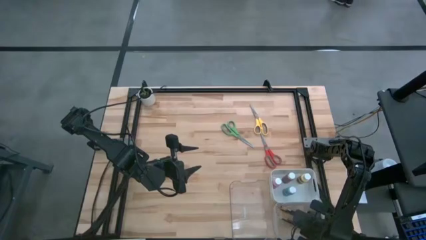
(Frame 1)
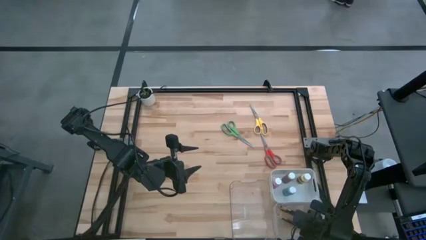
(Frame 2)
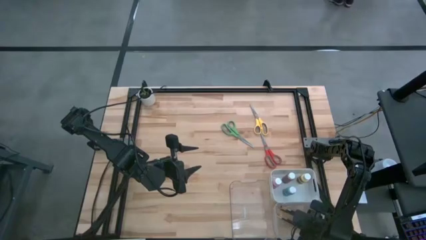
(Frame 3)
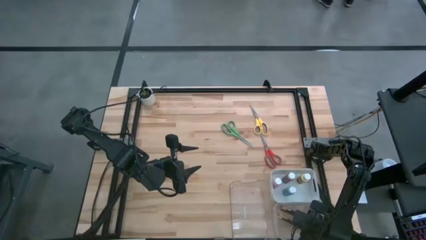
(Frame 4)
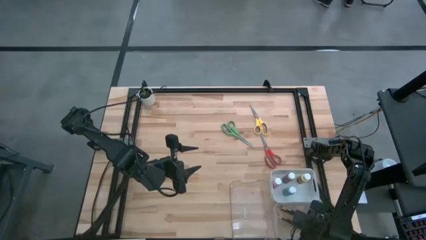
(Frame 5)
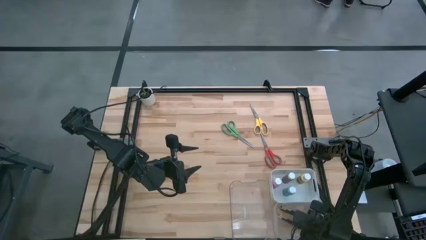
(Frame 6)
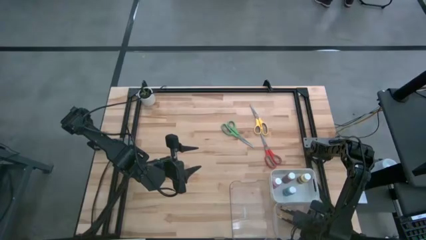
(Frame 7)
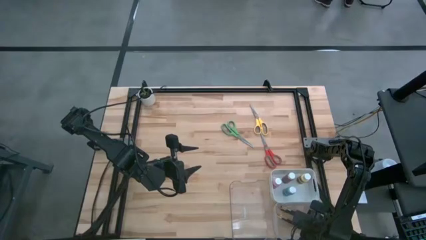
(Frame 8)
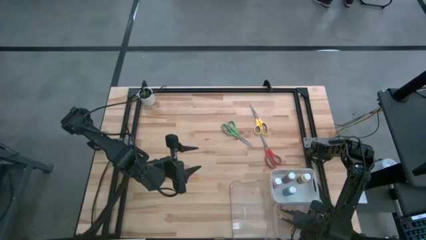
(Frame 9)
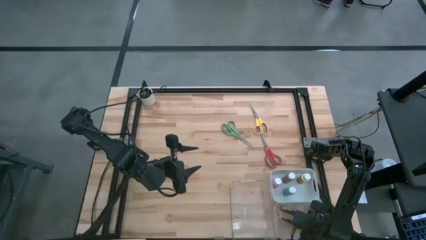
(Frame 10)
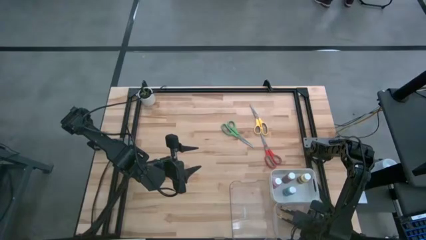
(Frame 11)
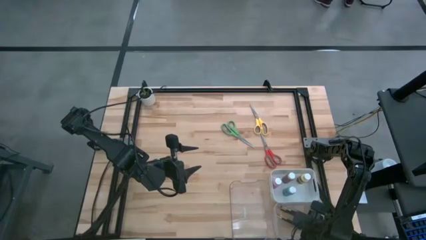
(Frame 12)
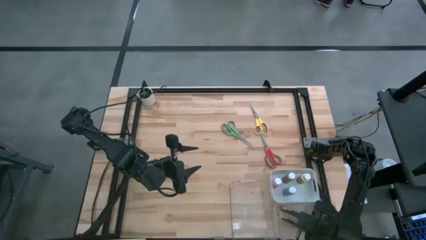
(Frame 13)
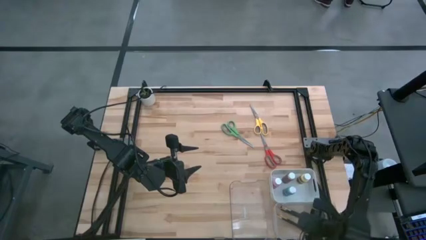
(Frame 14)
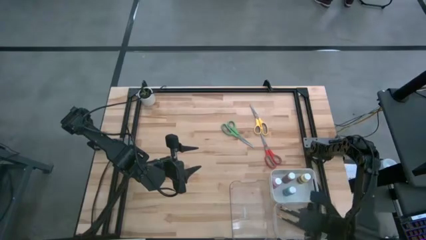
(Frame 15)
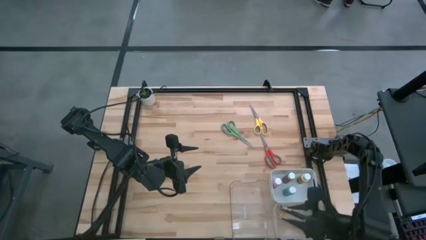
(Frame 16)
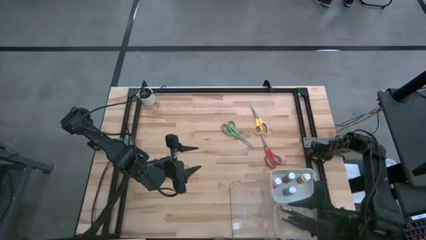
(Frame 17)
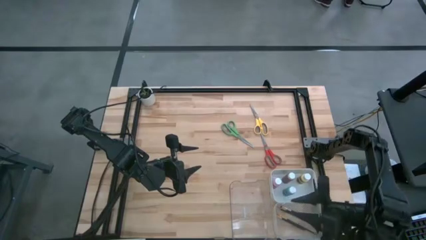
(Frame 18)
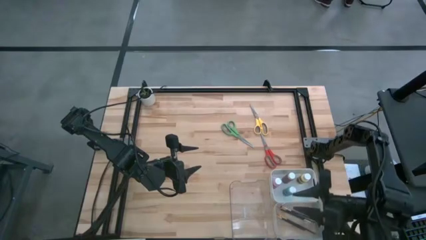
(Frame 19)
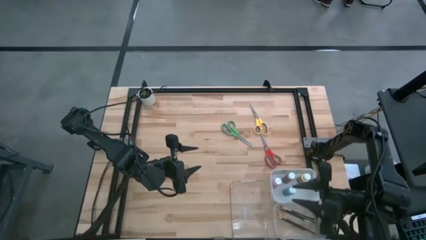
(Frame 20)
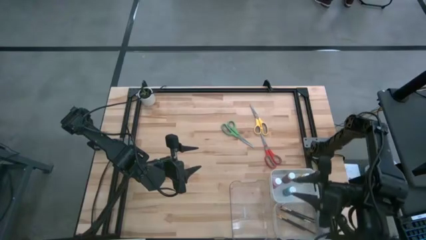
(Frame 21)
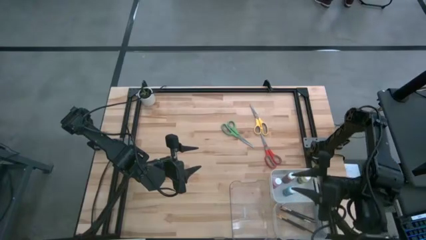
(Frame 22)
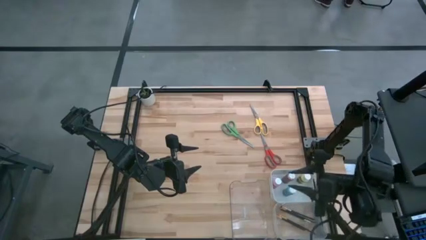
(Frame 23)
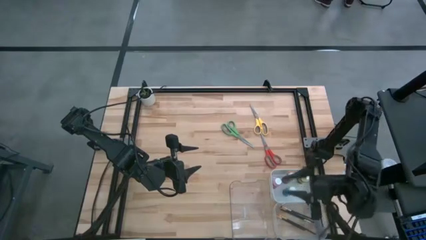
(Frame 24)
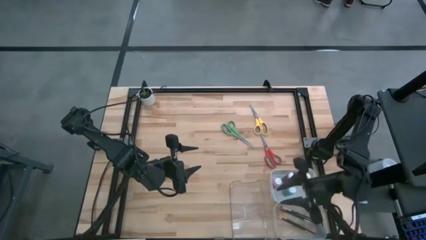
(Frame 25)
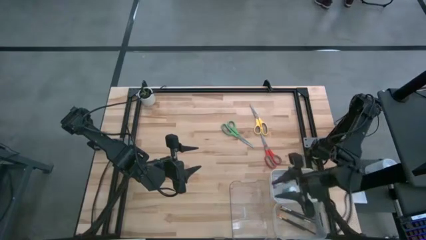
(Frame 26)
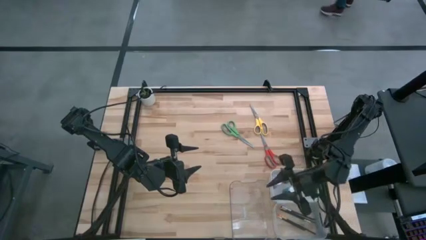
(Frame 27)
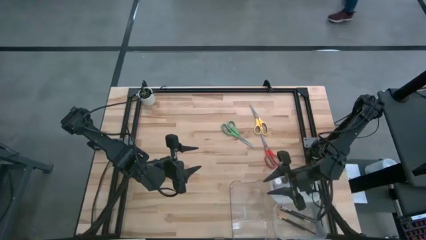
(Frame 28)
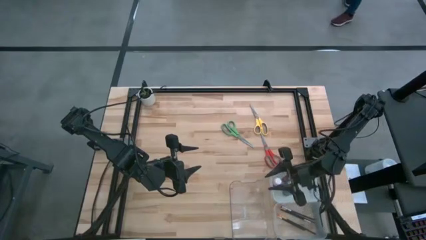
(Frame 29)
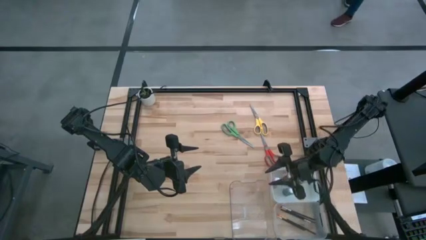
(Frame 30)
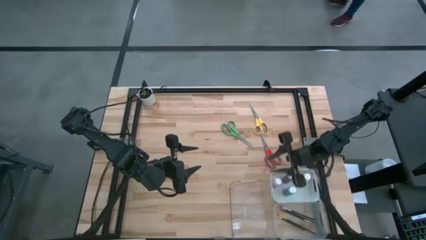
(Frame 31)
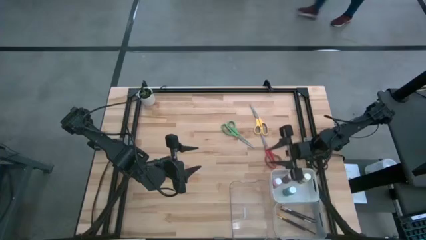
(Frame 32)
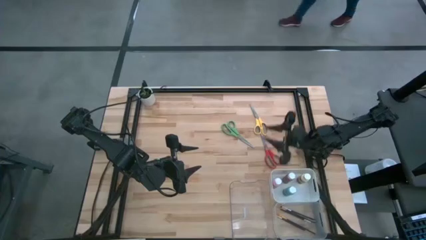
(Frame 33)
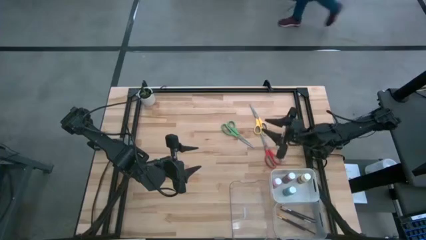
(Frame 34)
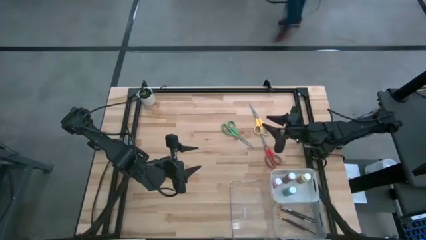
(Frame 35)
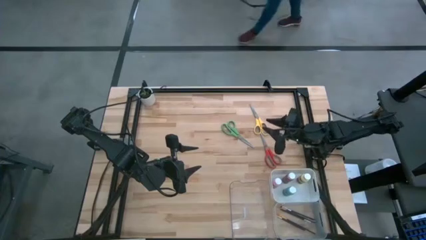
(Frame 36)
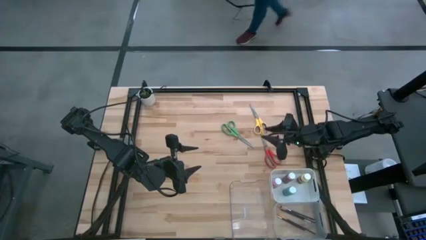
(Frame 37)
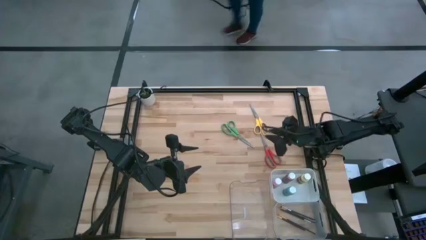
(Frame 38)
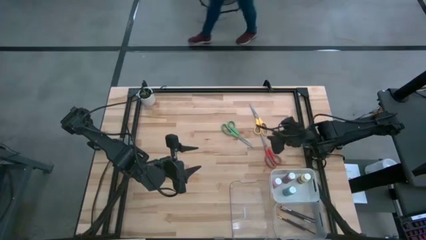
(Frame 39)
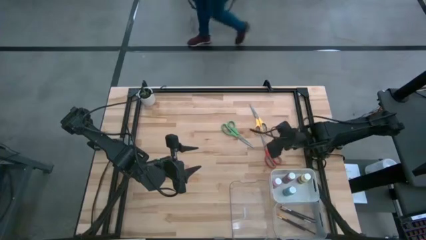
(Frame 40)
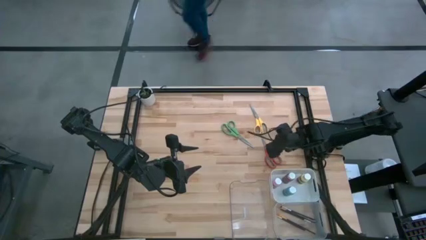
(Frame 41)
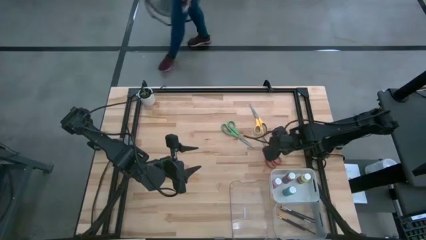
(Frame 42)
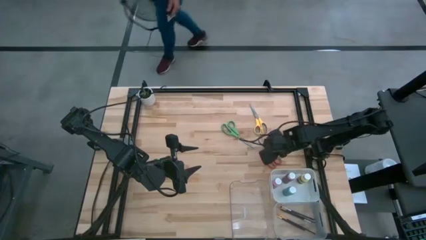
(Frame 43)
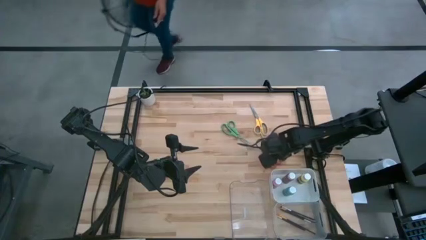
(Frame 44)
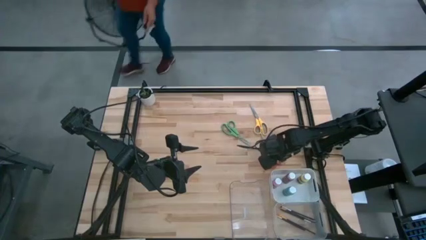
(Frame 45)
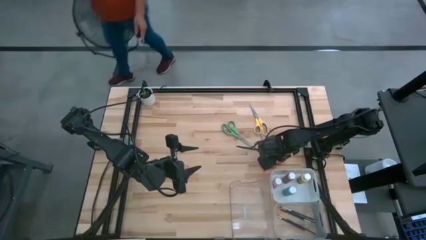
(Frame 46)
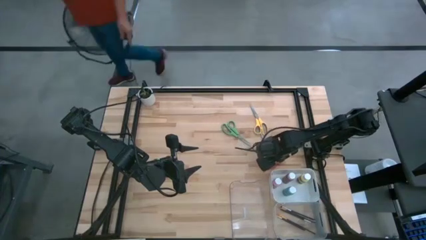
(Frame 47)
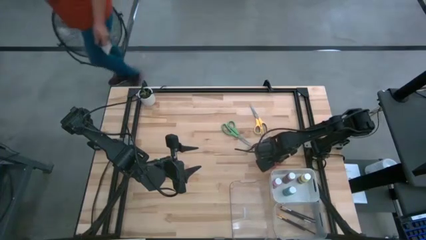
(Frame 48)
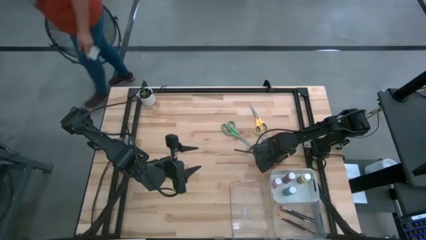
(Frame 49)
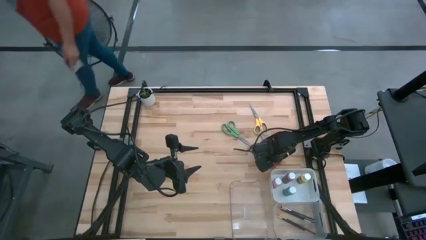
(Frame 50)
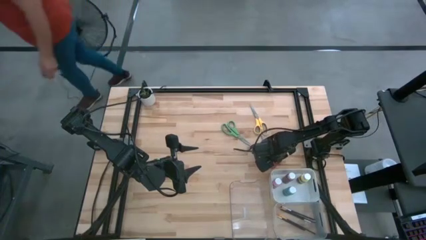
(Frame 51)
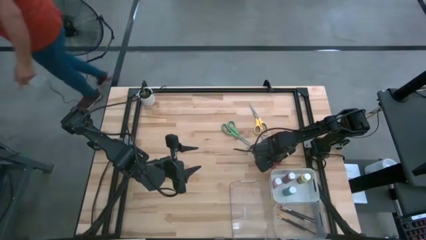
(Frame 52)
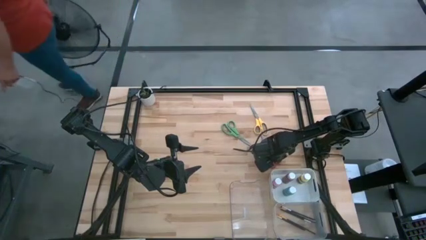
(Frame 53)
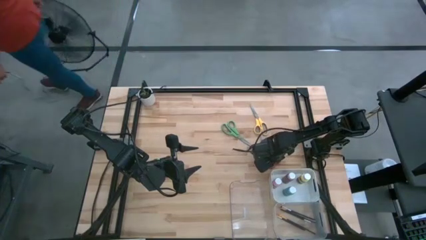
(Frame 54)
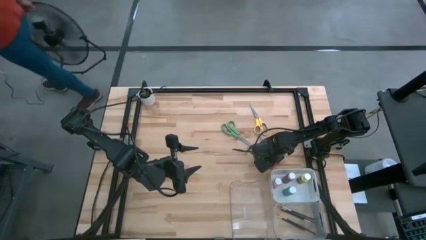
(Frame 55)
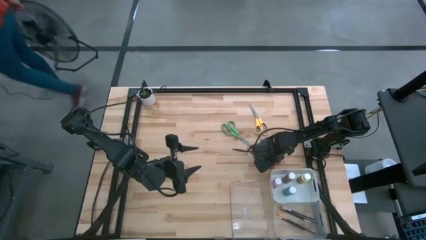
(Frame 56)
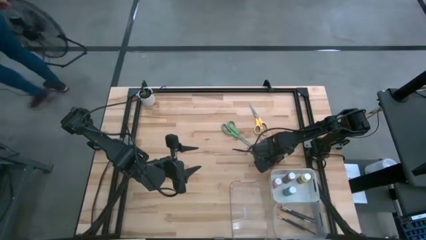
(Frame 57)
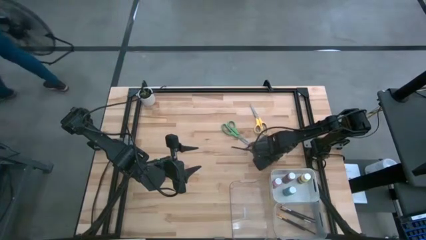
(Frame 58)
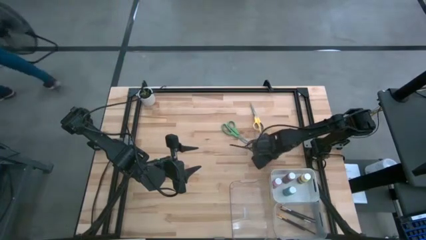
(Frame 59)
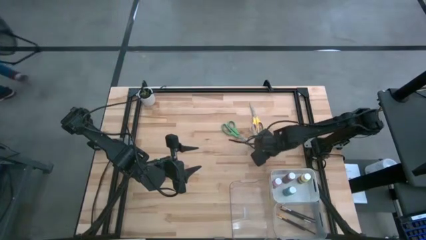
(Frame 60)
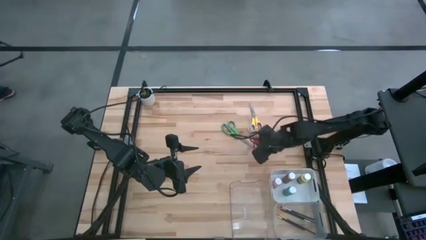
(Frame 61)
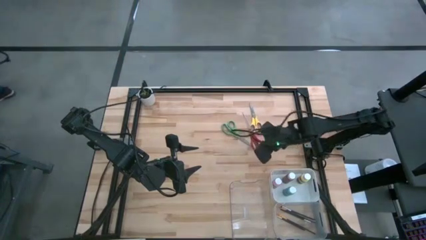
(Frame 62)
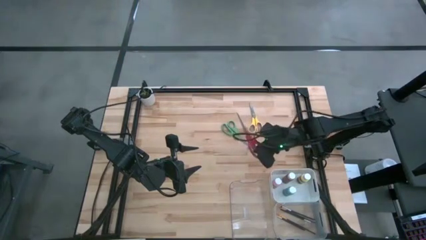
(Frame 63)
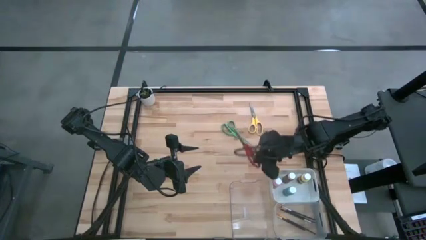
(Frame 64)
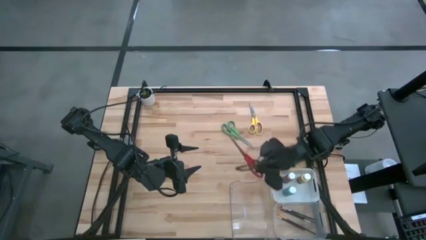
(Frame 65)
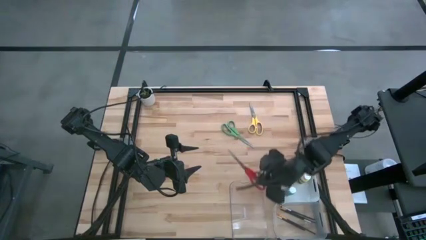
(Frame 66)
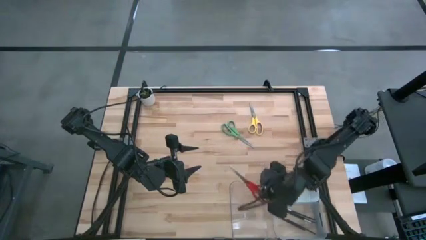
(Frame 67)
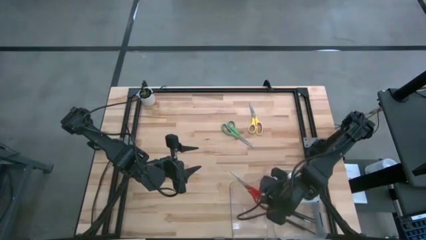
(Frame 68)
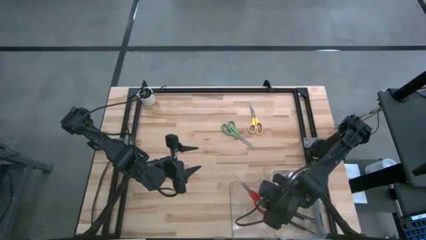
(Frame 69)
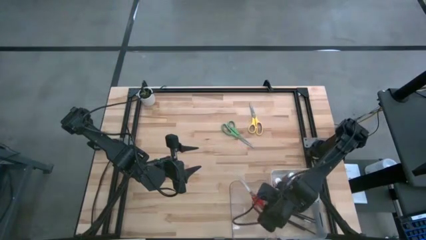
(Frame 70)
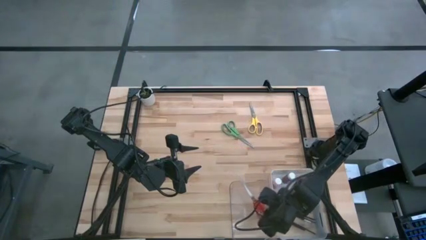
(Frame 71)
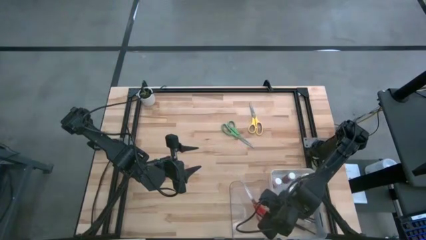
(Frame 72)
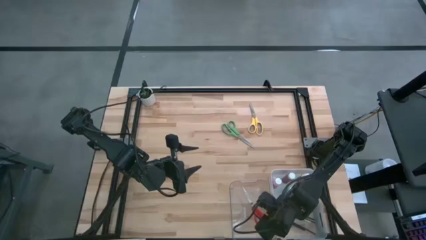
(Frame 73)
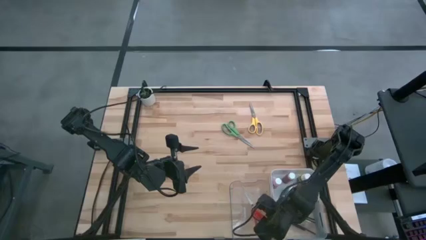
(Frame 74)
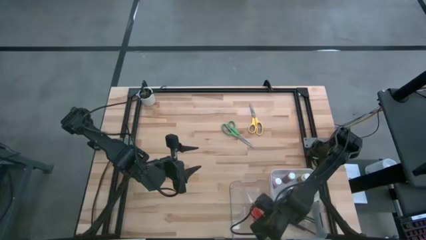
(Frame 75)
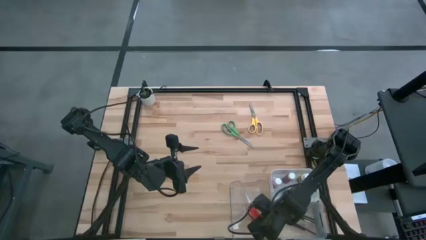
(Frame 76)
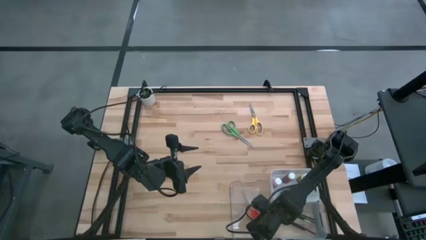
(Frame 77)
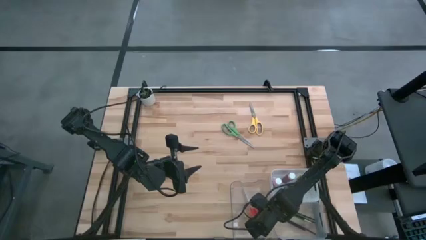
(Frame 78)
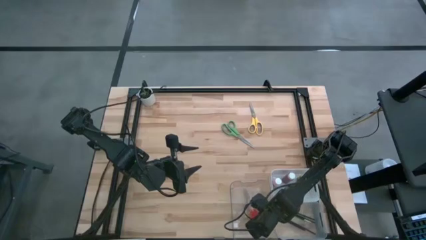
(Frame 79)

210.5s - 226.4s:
Task: Pick & Place Paint Supplies
Put the red scissors into the left transparent bin
